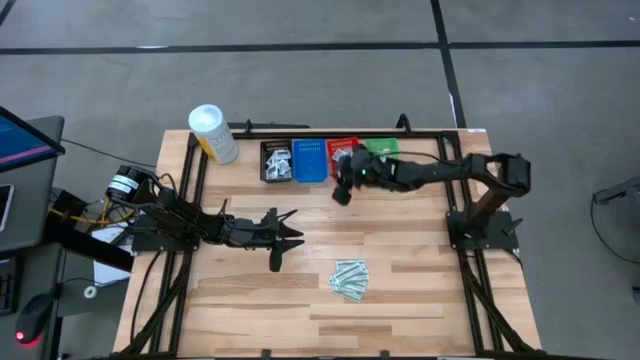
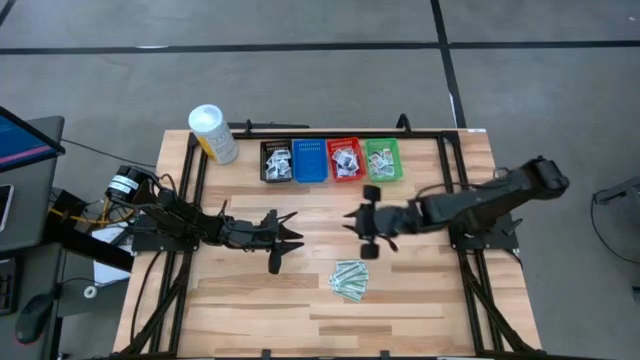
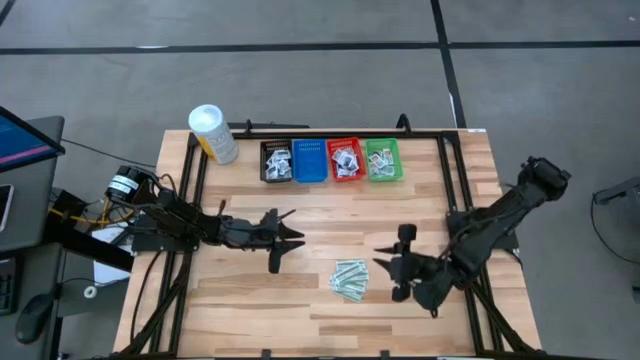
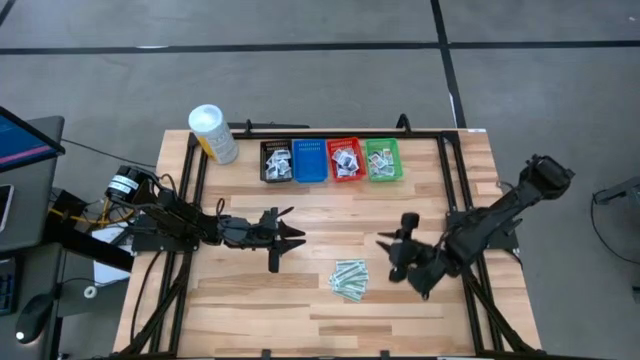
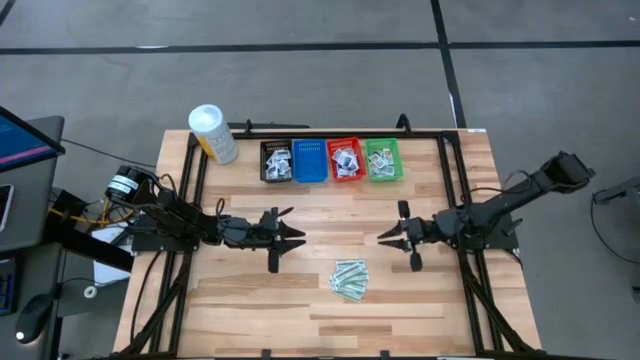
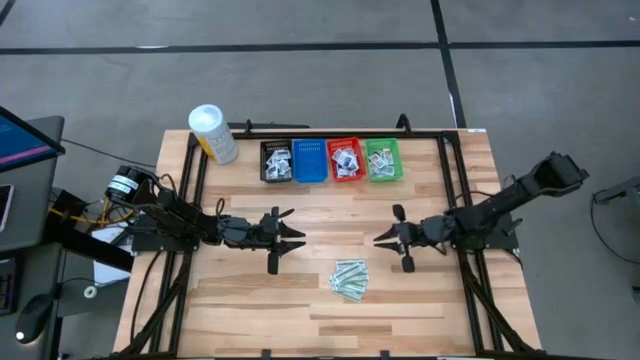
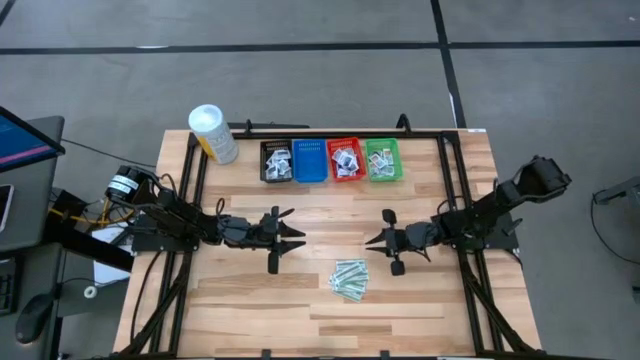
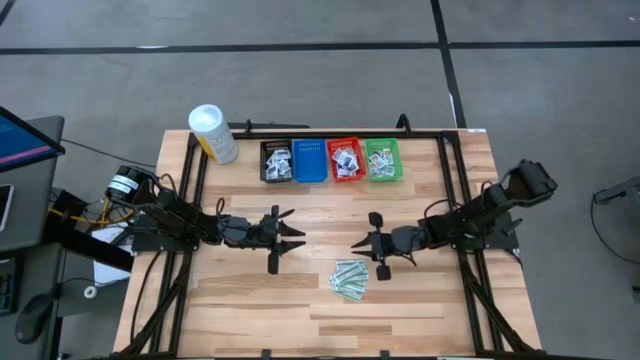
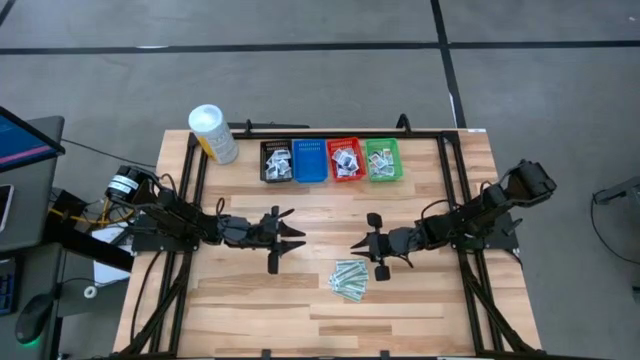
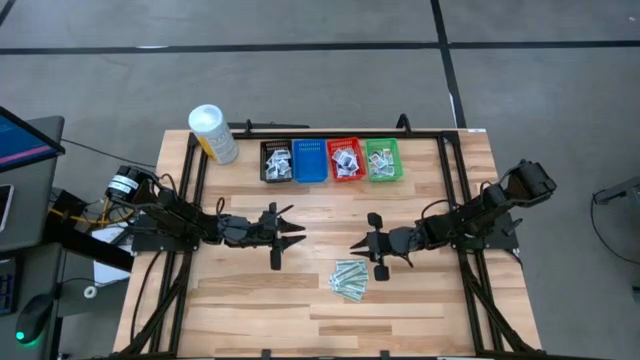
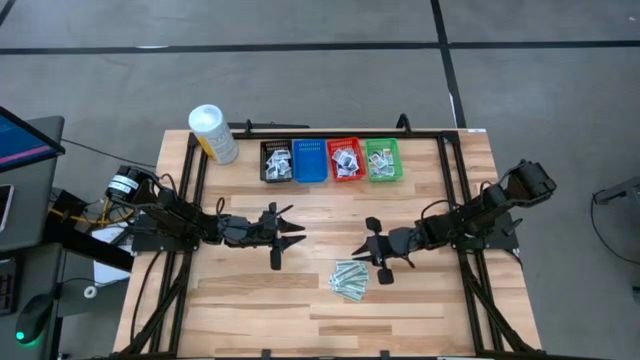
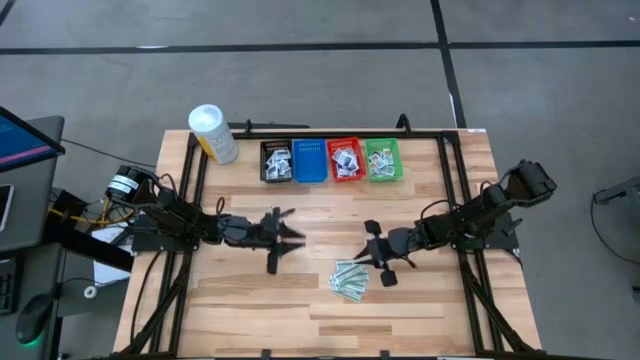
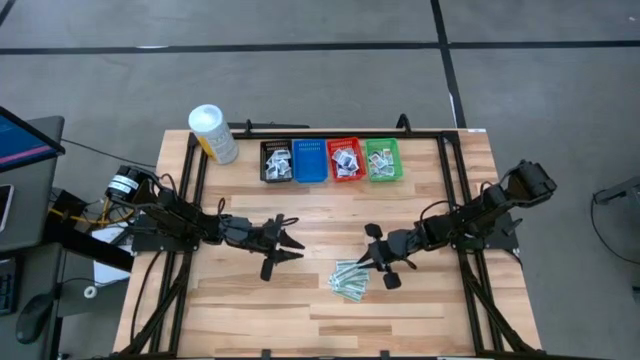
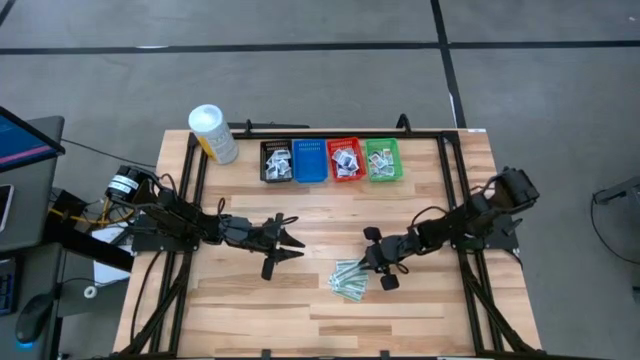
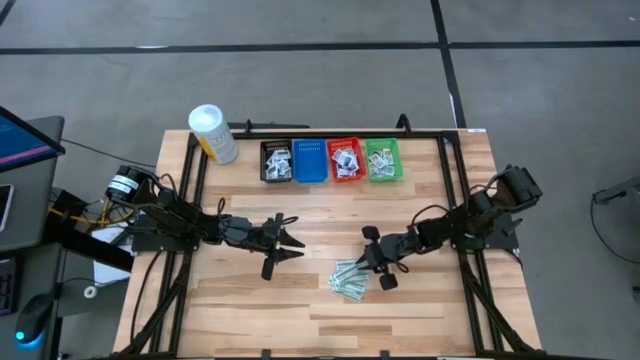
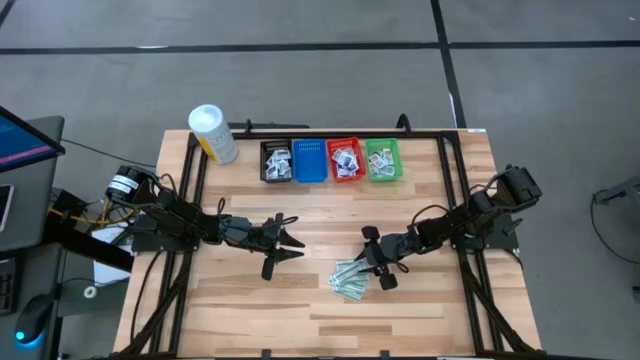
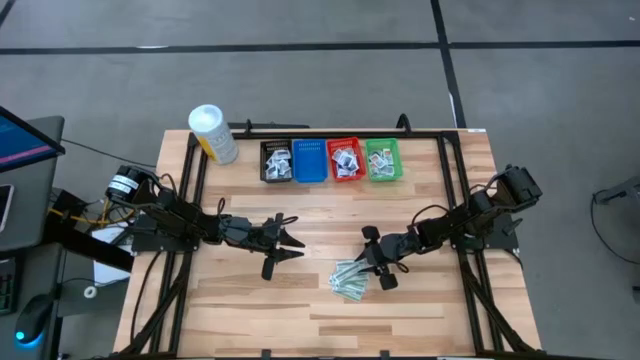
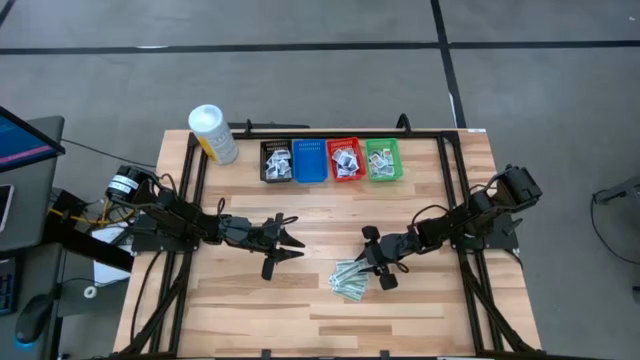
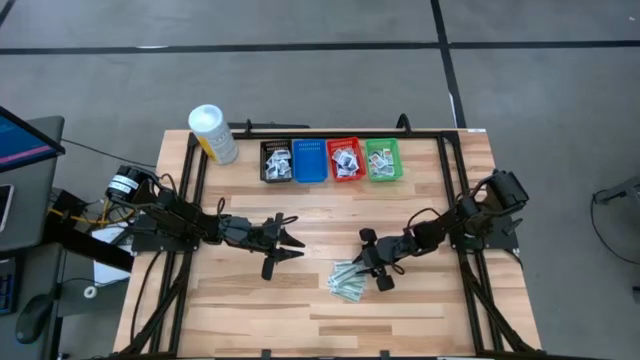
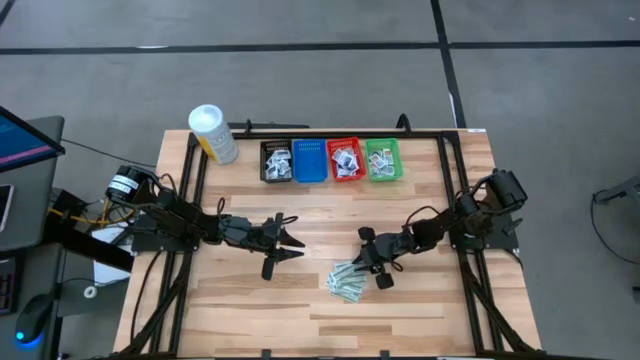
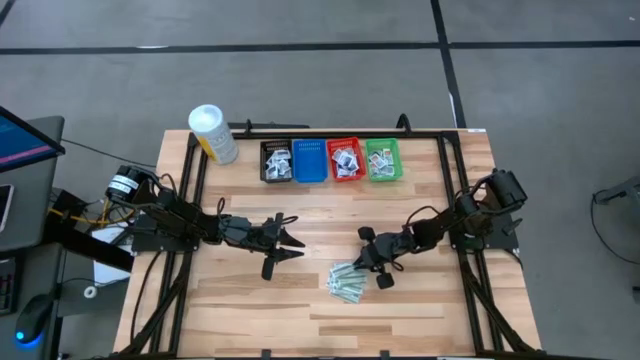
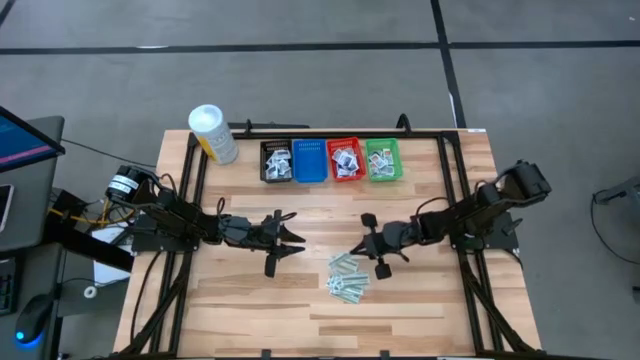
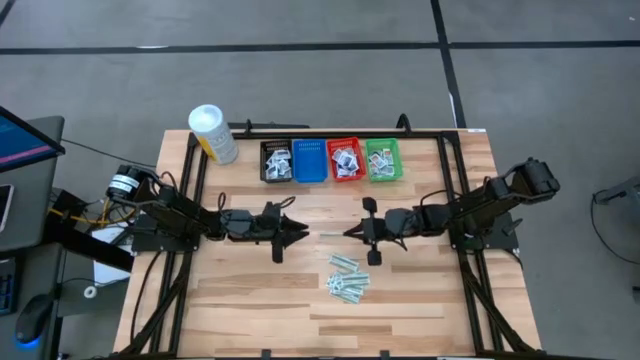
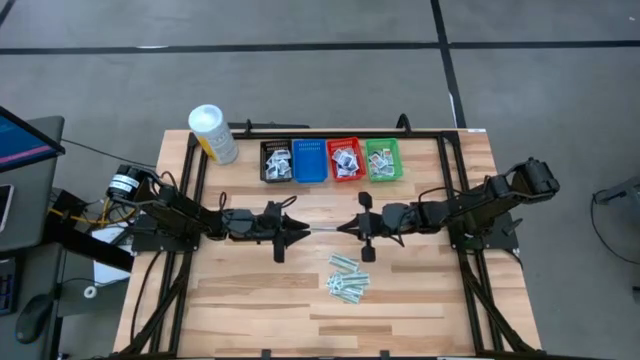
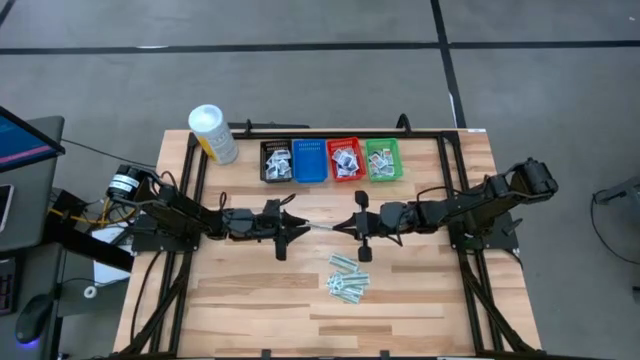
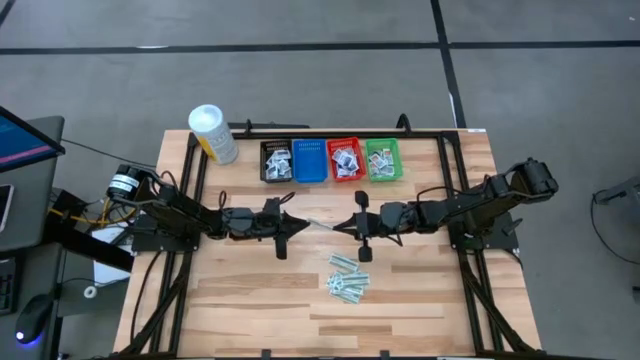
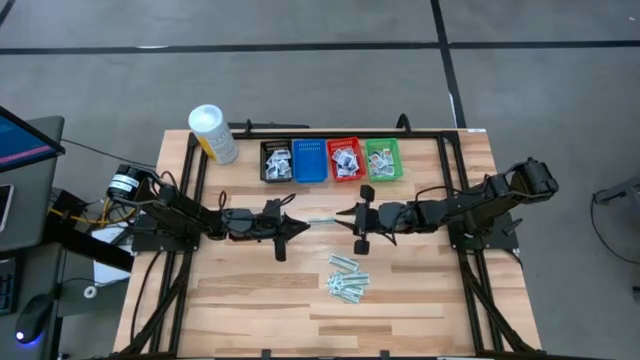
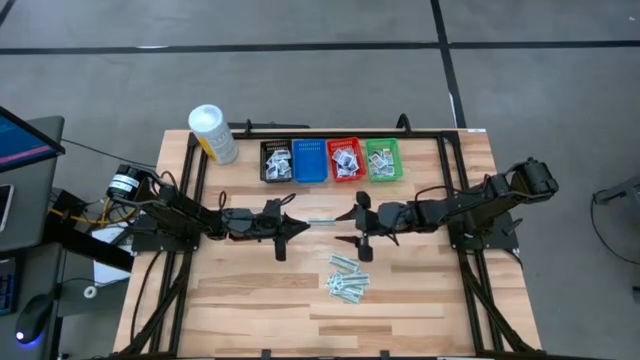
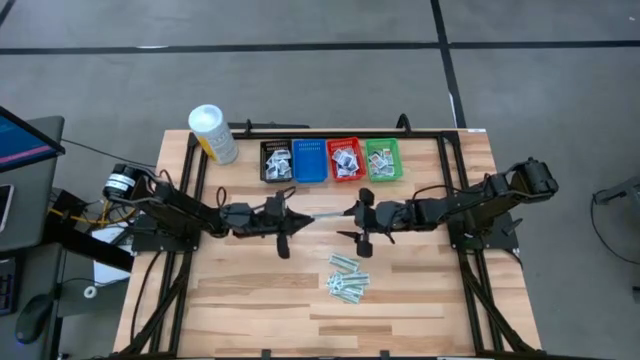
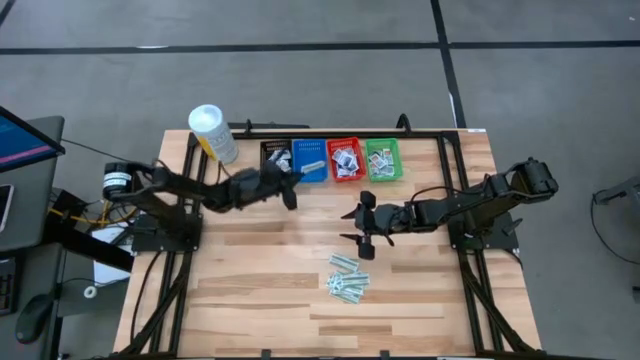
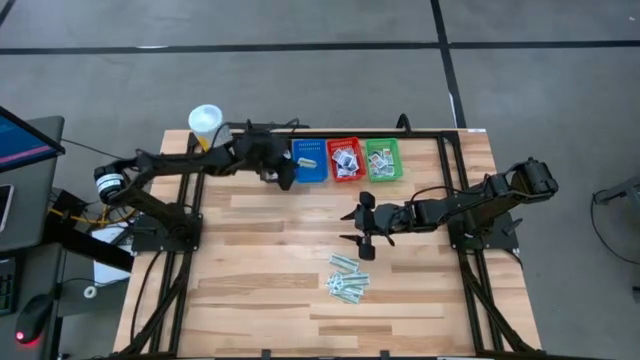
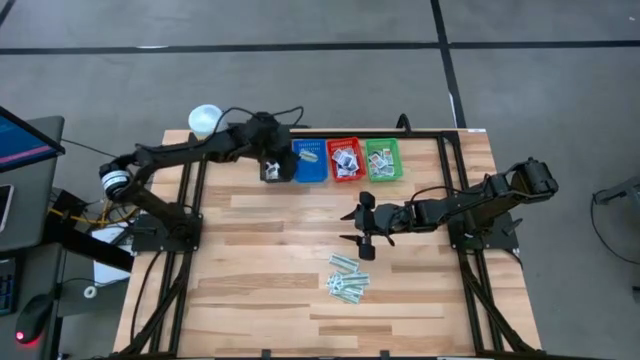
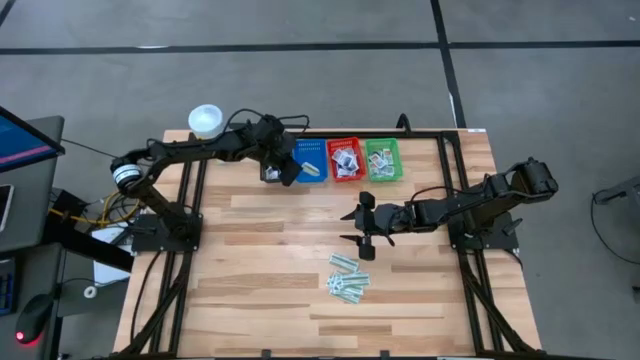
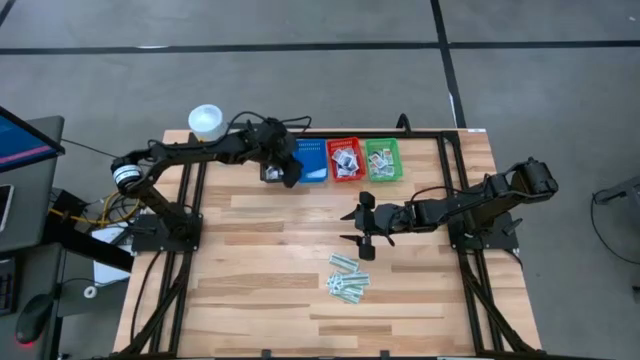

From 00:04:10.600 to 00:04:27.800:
Task: Pick & Place First Aid Supplies
Put the green pad into the blue bin

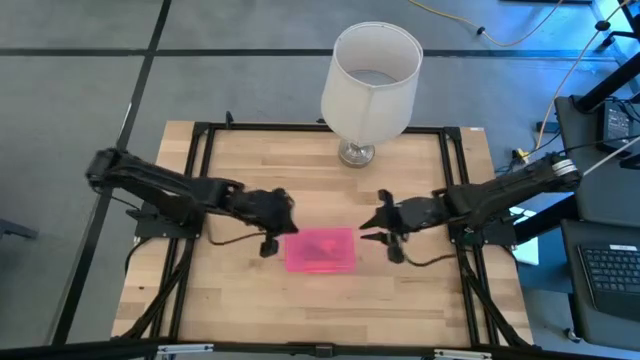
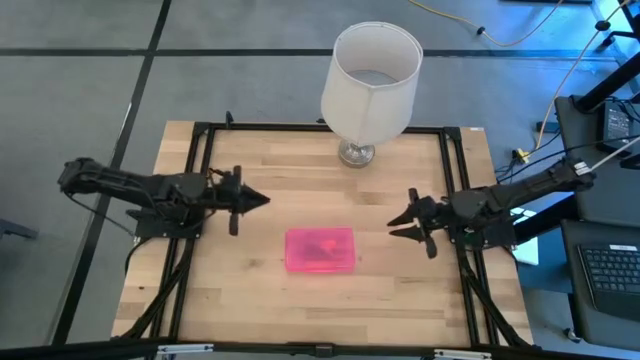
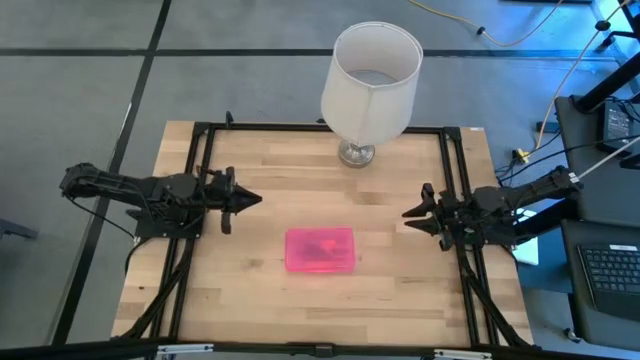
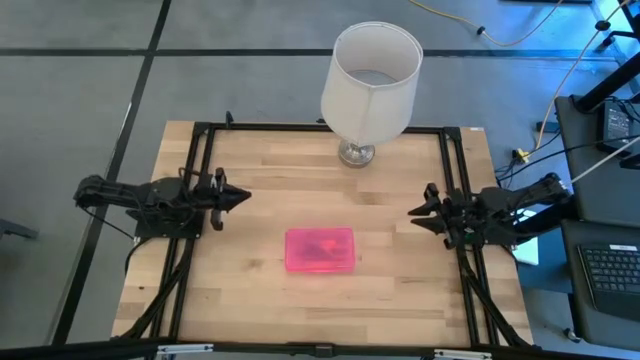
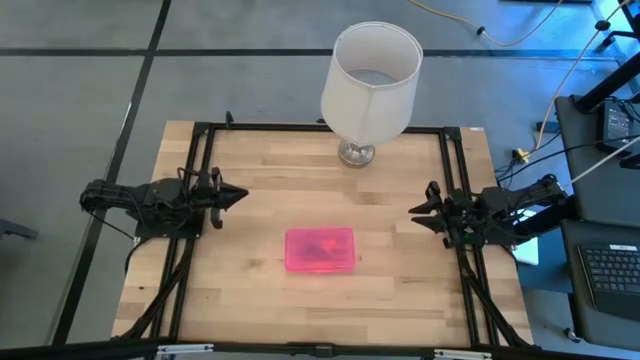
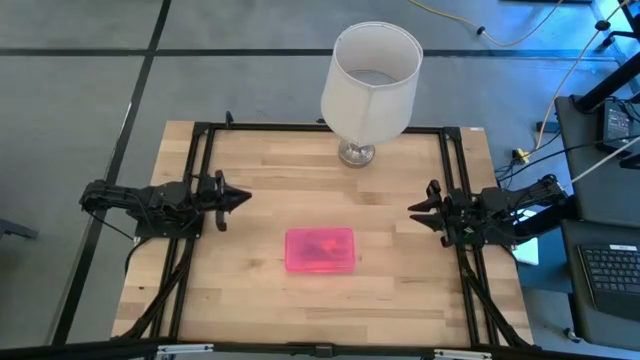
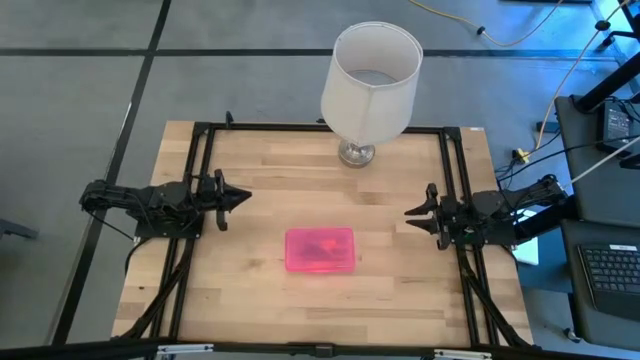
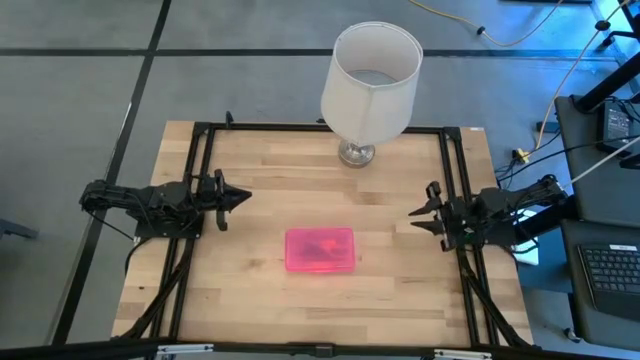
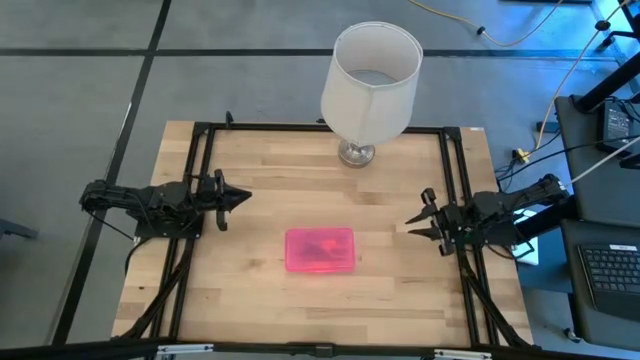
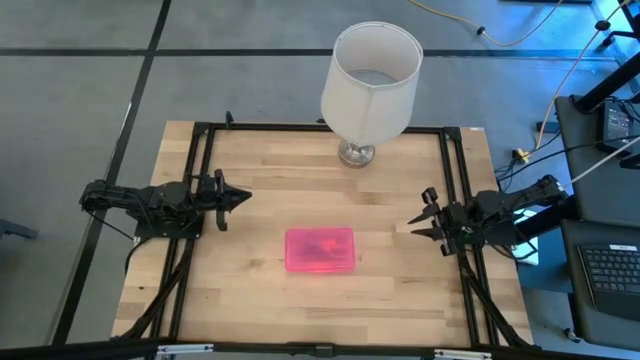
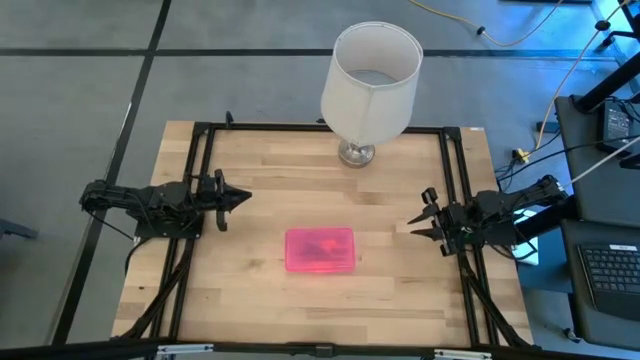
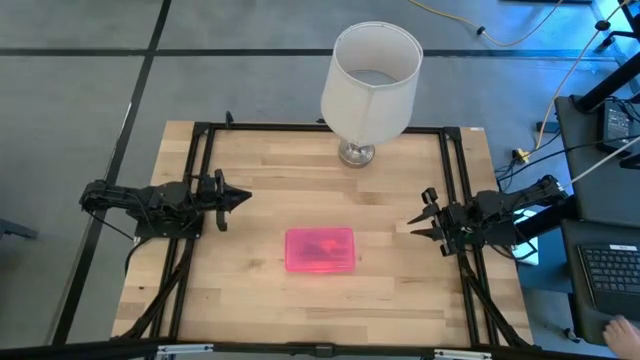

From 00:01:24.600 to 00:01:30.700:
Task: Pick & place school supplies into a supply box
Return to Home Position
